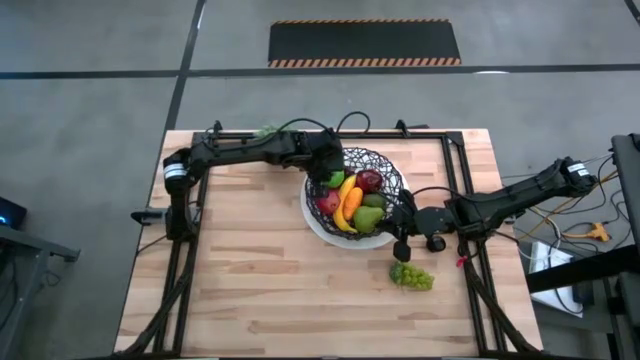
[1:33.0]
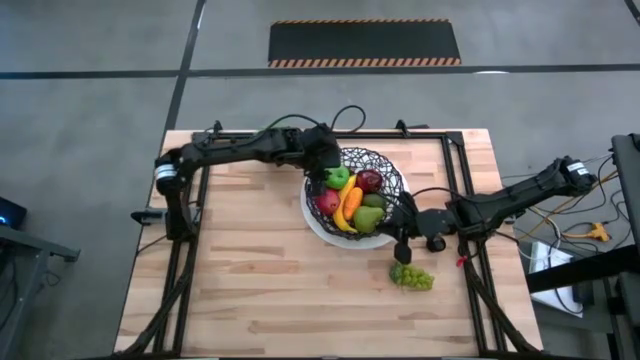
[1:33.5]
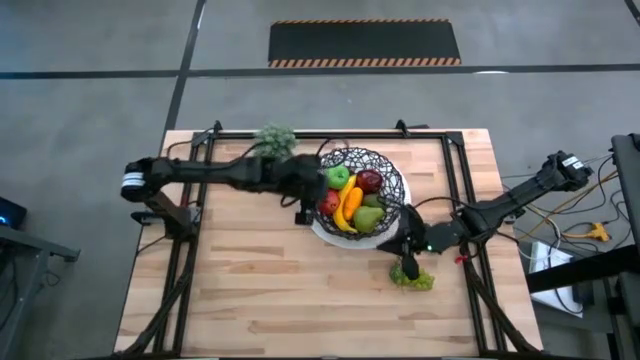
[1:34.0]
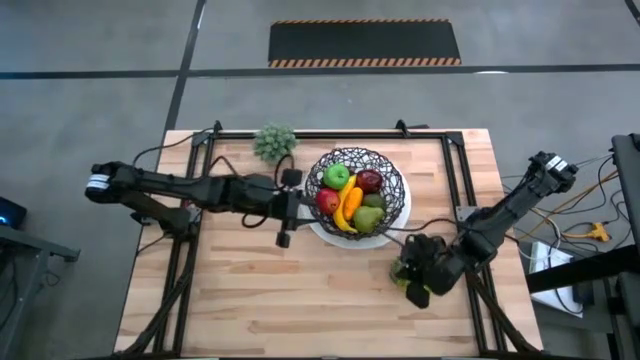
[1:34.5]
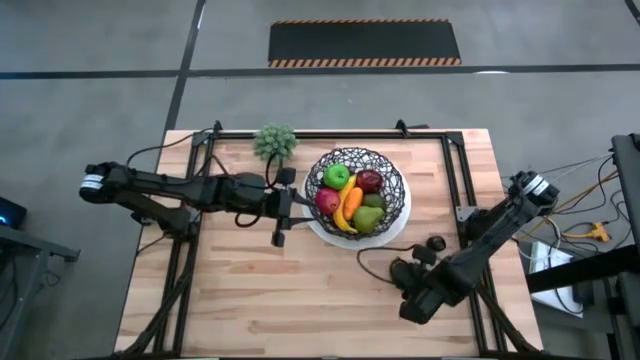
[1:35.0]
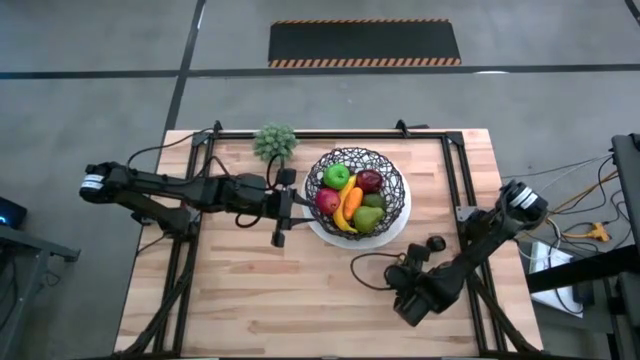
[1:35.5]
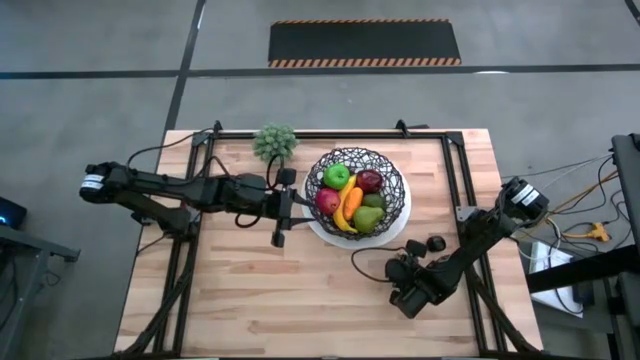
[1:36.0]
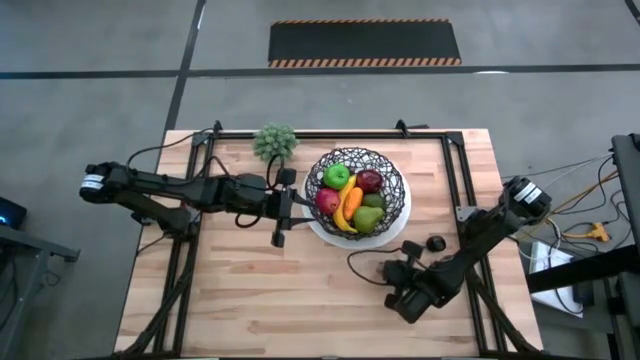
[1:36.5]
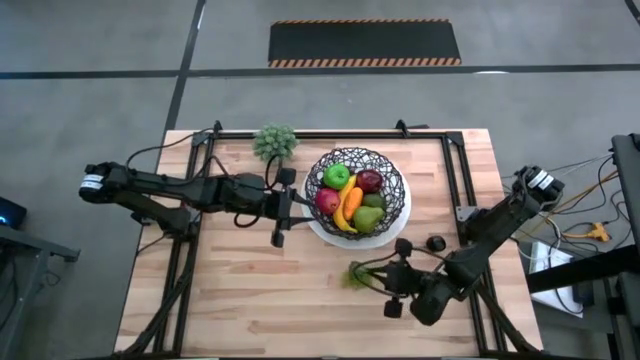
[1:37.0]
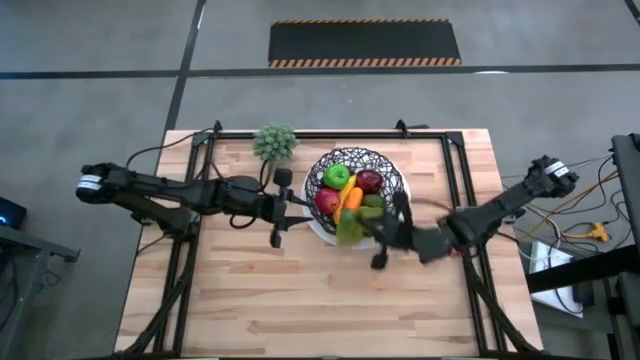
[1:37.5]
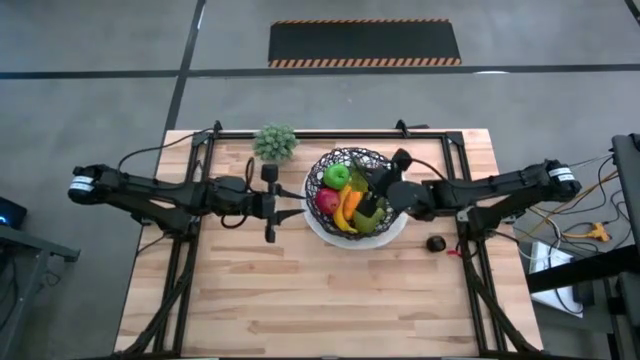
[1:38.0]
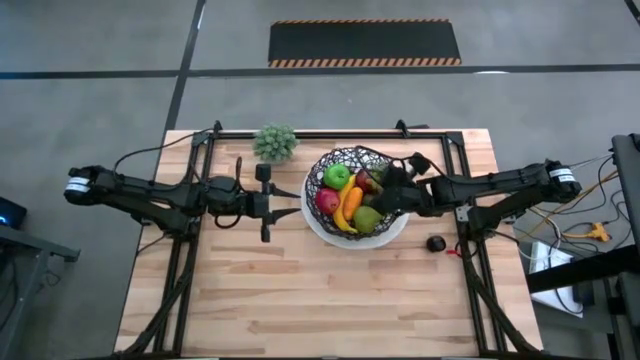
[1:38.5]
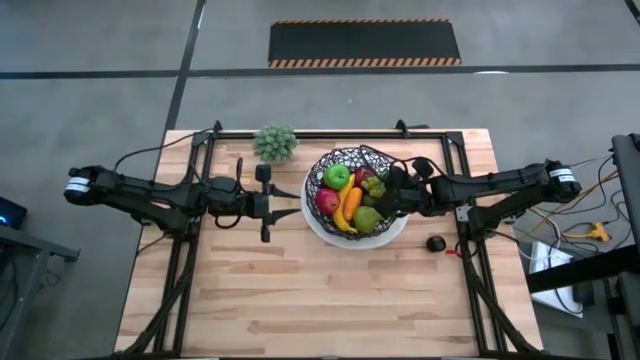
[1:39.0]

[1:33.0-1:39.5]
Task: Build produce basket
Put the green grapes into the black wire basket

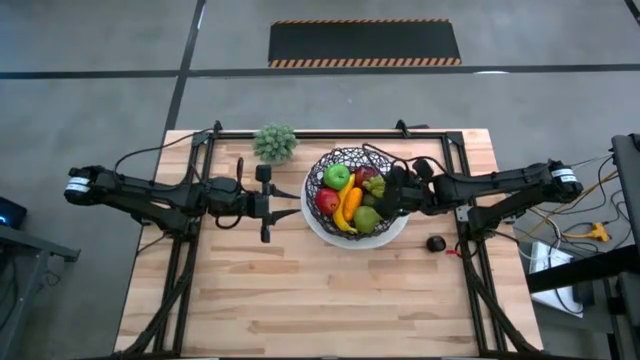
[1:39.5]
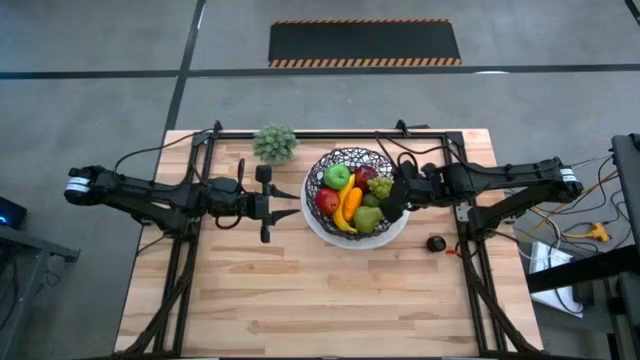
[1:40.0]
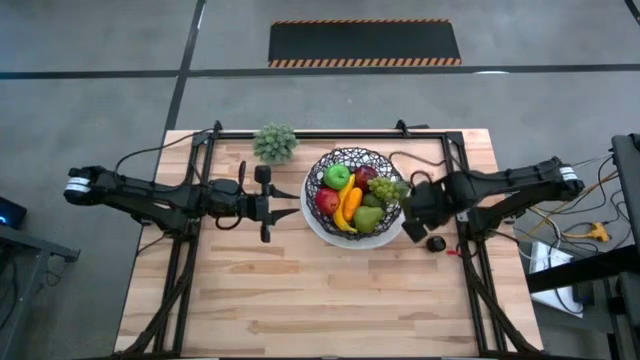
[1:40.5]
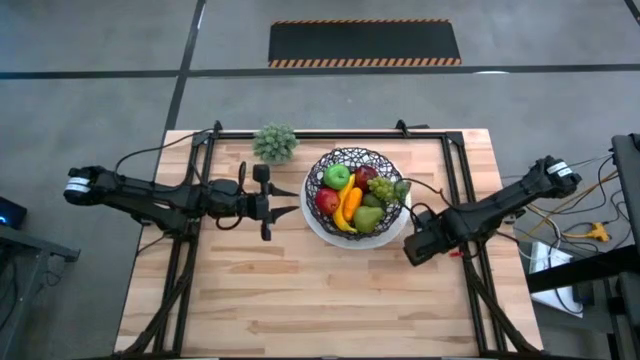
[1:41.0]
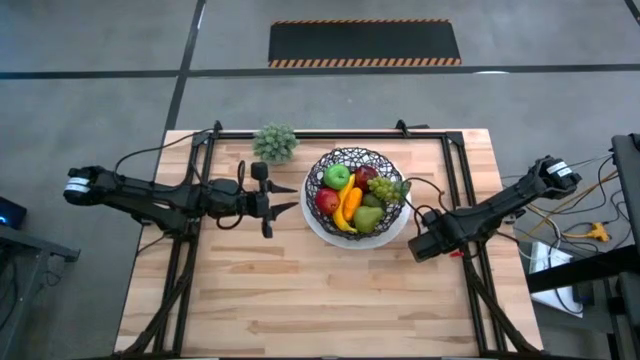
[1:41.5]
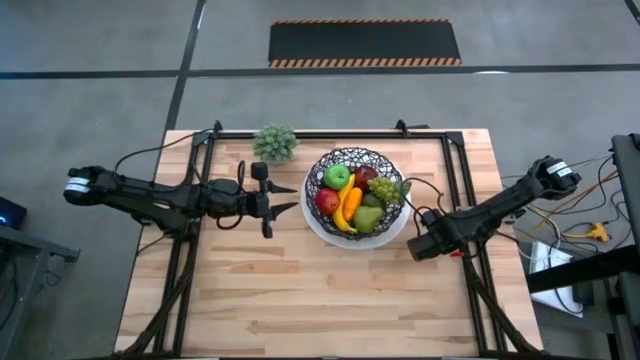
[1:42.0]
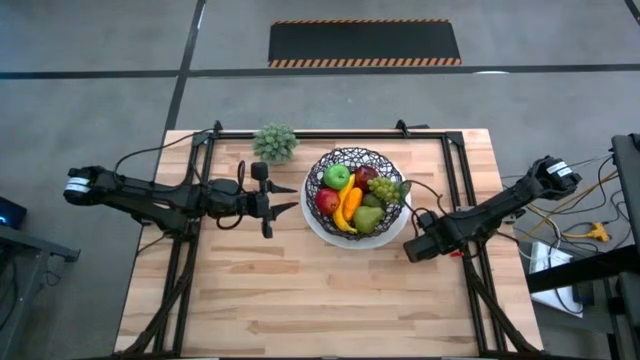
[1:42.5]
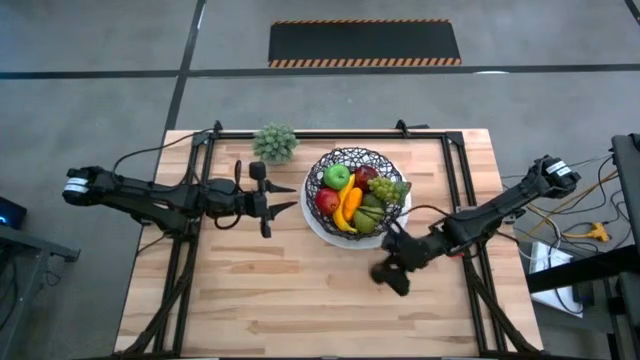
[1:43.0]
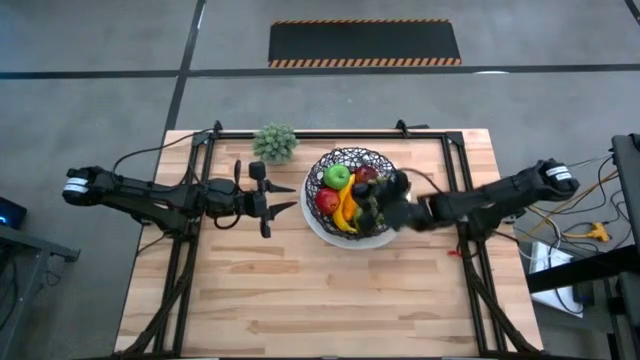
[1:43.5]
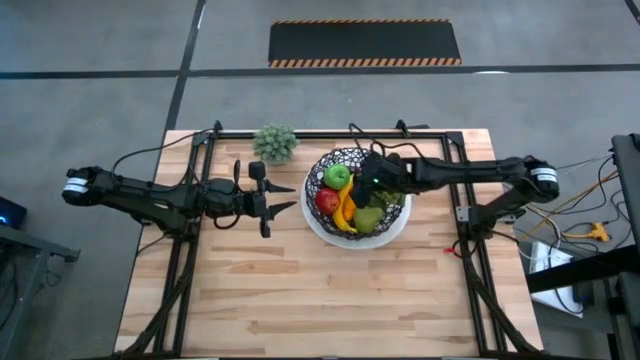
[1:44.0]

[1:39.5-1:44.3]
Put the black plum into the black wire basket

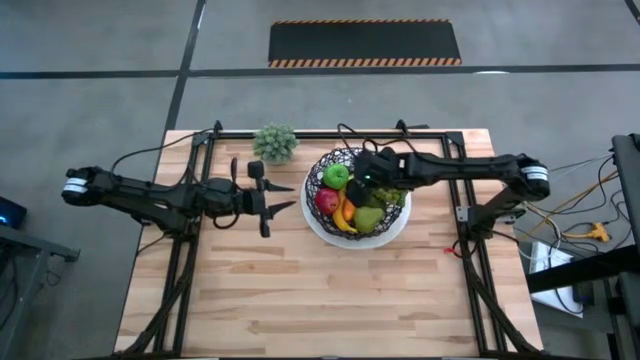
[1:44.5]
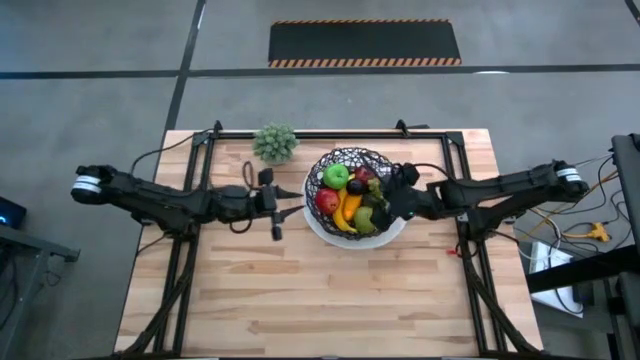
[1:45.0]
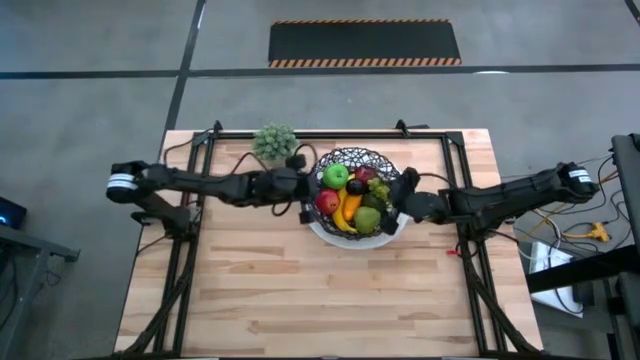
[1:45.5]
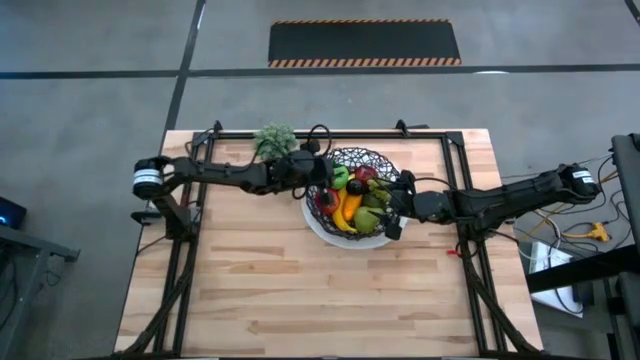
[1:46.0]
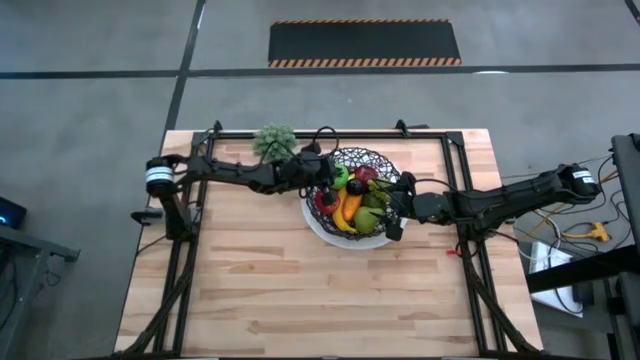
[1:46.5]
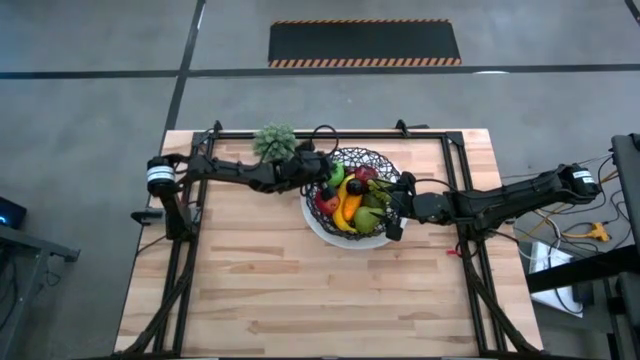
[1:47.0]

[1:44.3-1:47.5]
Adjust the green apple in the black wire basket

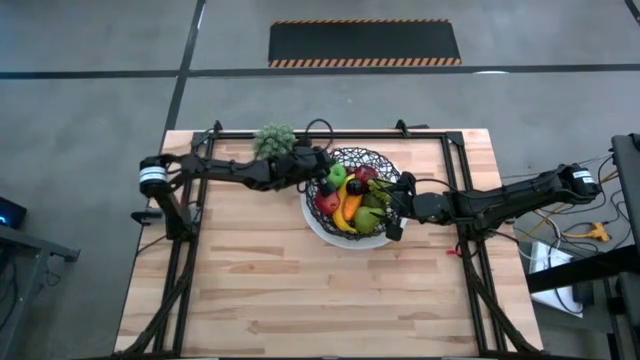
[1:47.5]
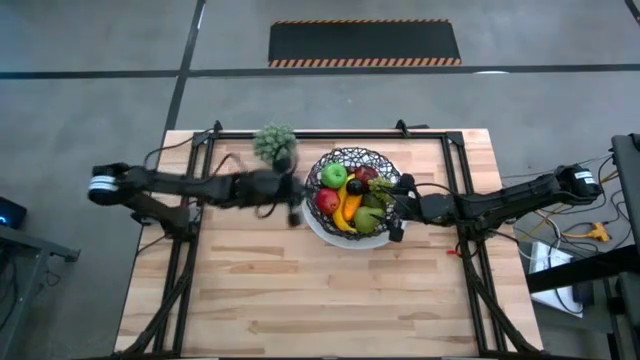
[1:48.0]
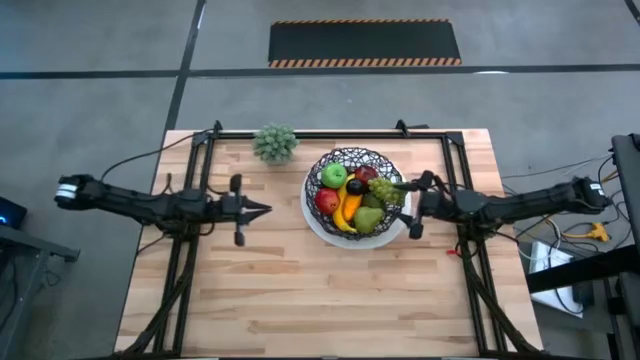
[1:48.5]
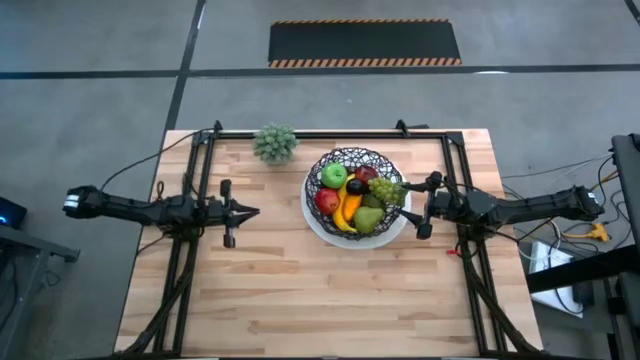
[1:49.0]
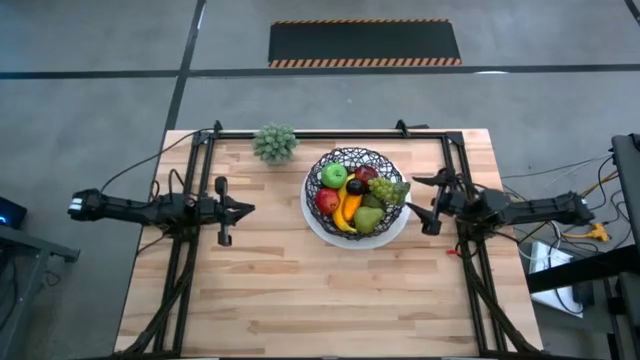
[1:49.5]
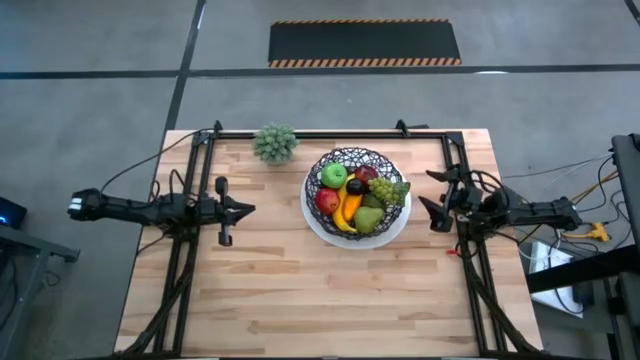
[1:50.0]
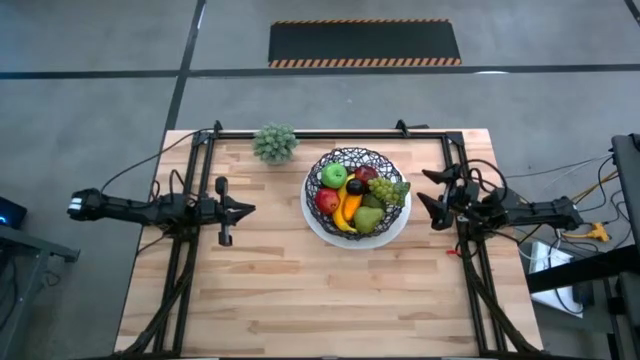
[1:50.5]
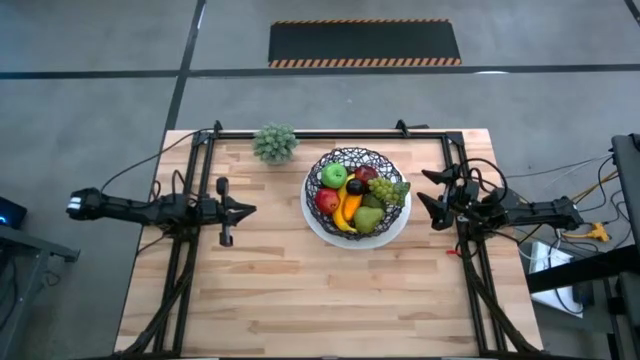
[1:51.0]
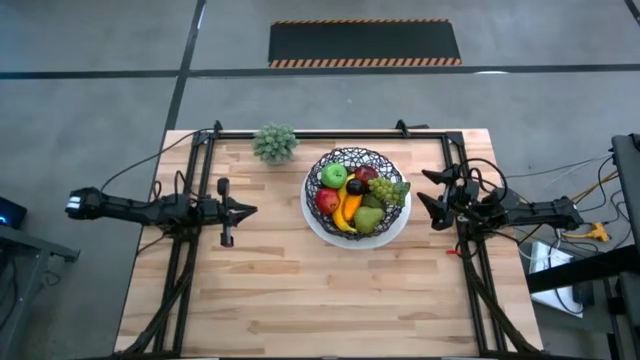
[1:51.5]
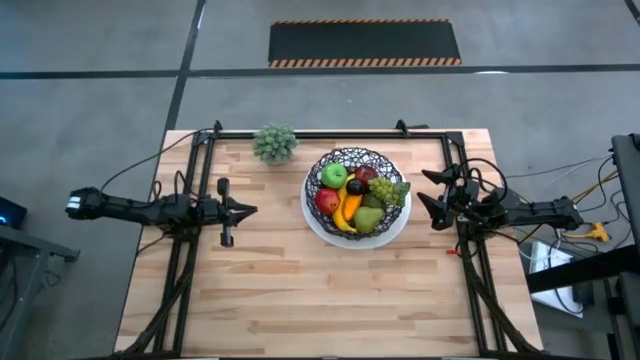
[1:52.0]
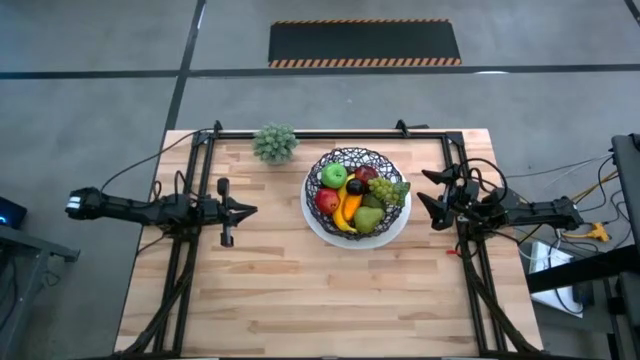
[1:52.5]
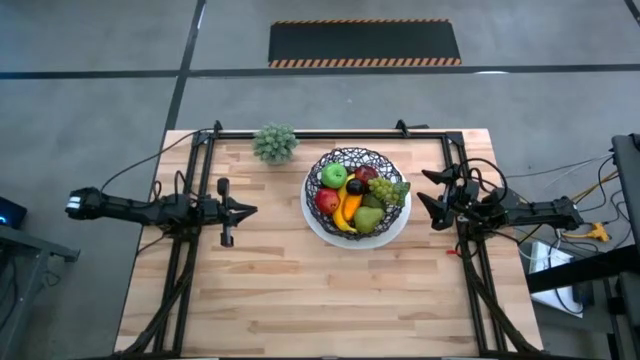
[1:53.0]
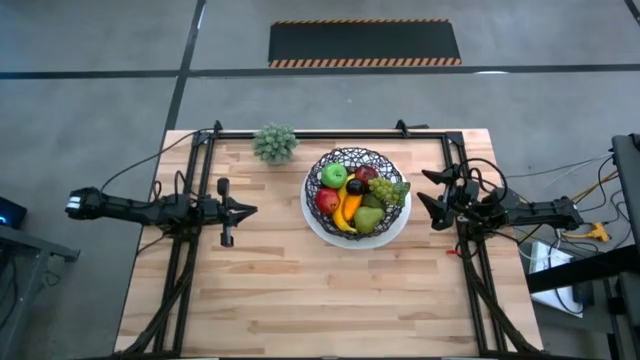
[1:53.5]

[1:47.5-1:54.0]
Return to Home Position
